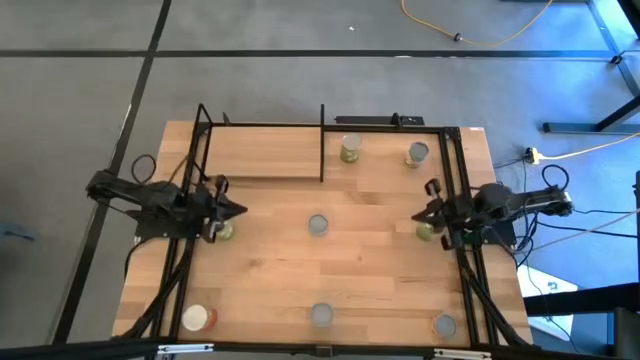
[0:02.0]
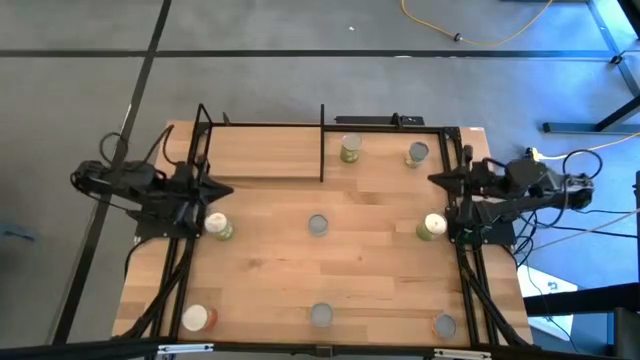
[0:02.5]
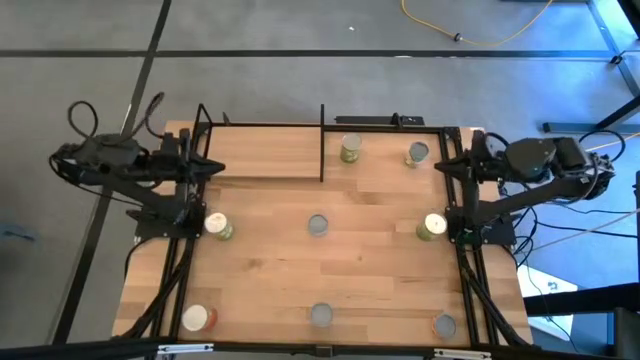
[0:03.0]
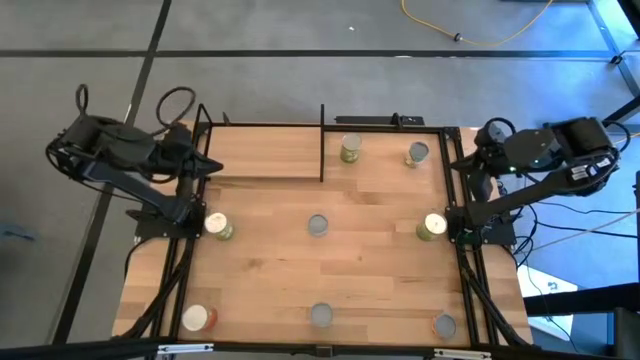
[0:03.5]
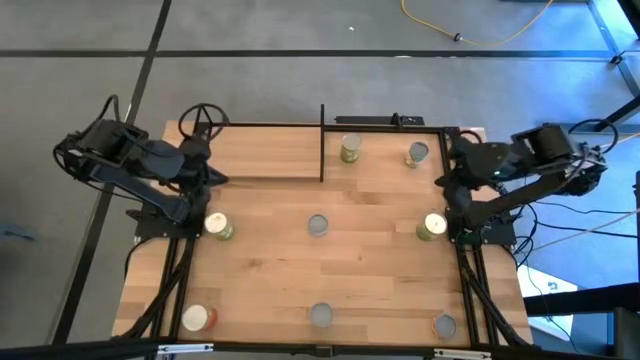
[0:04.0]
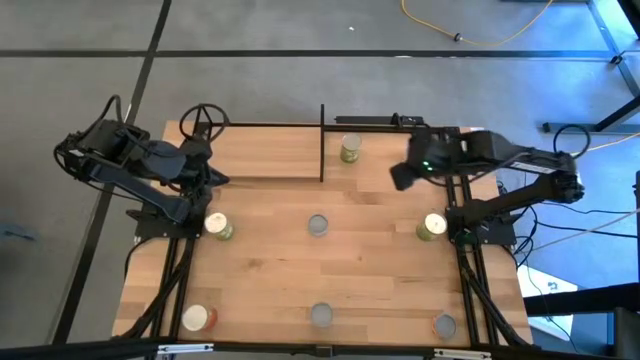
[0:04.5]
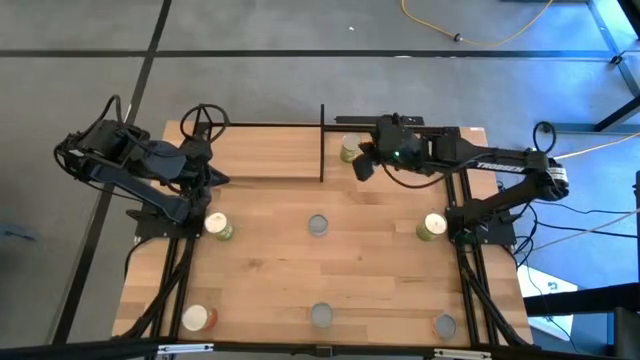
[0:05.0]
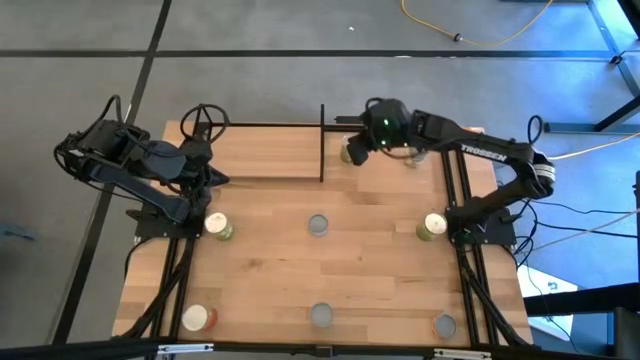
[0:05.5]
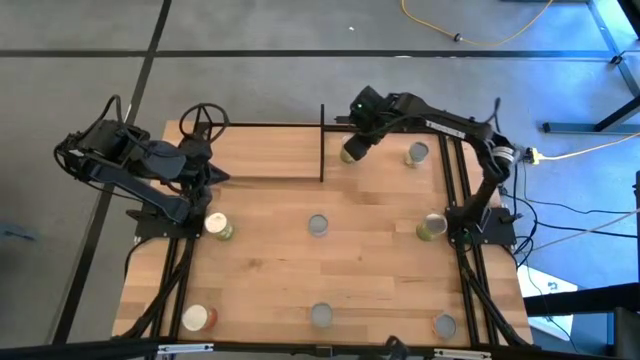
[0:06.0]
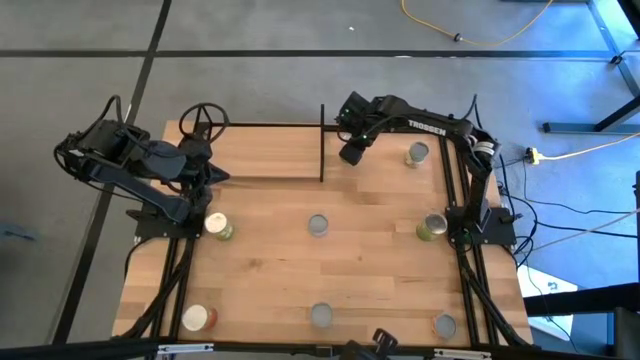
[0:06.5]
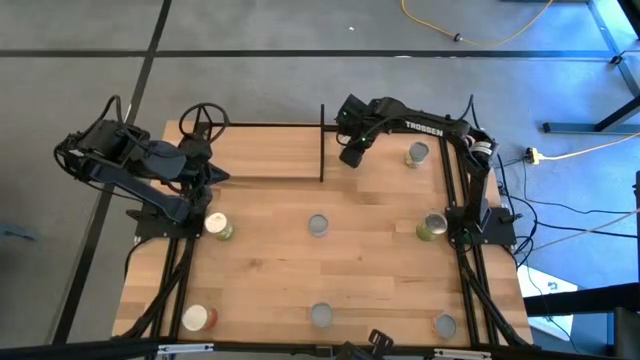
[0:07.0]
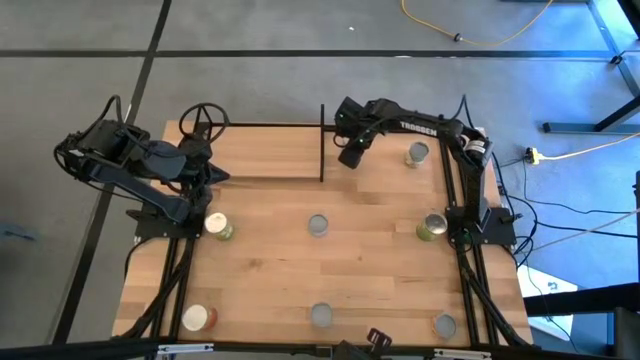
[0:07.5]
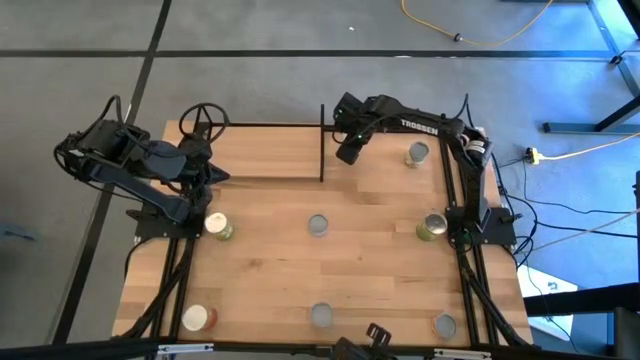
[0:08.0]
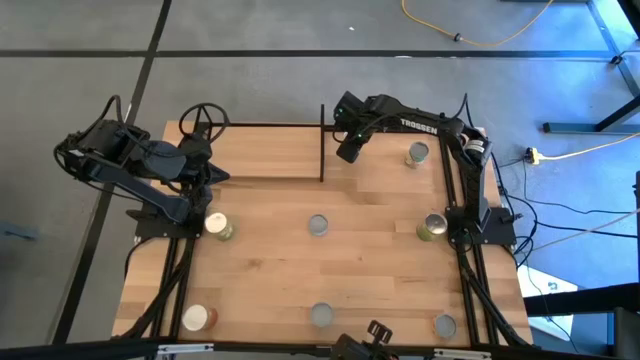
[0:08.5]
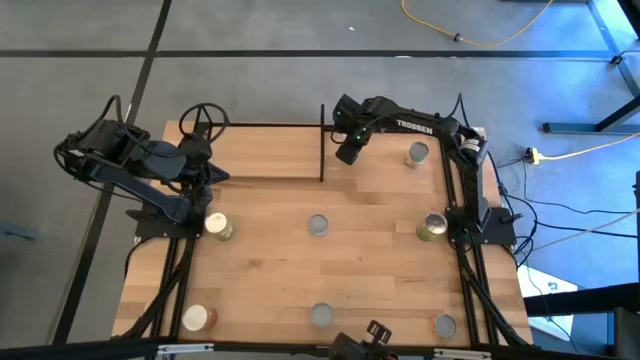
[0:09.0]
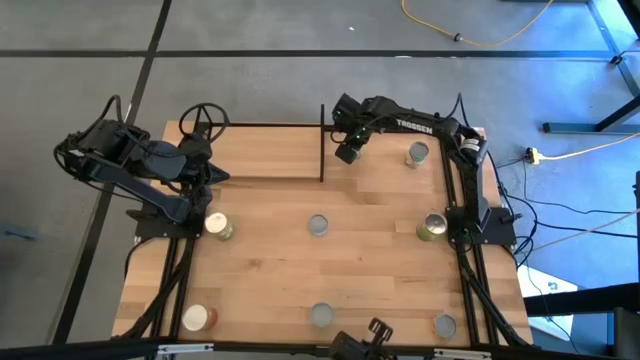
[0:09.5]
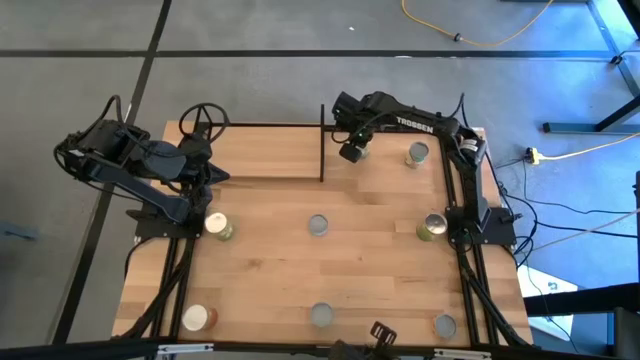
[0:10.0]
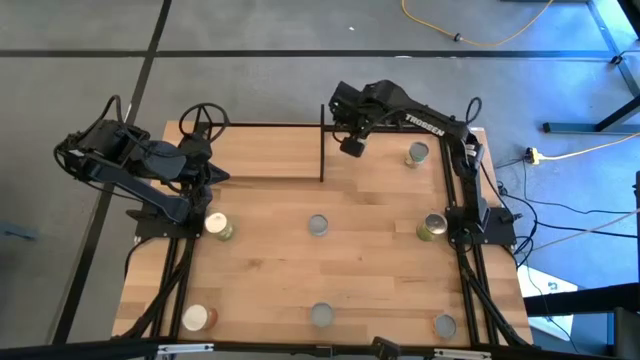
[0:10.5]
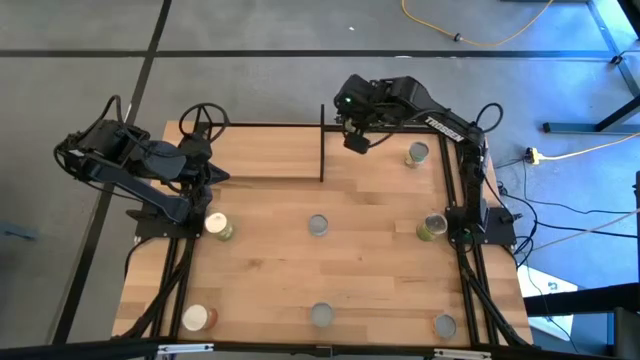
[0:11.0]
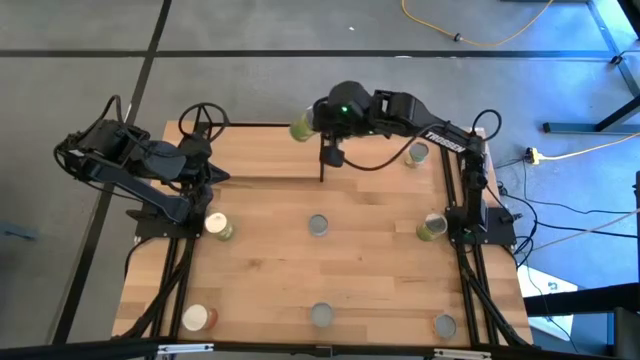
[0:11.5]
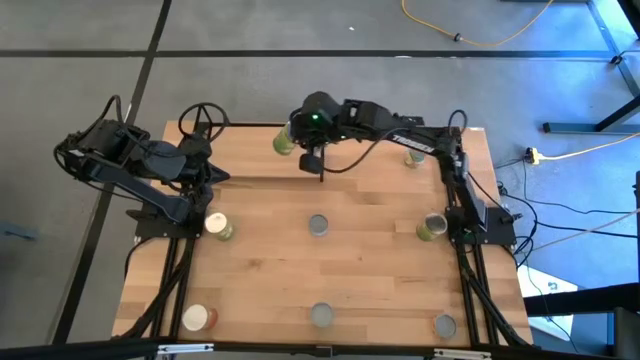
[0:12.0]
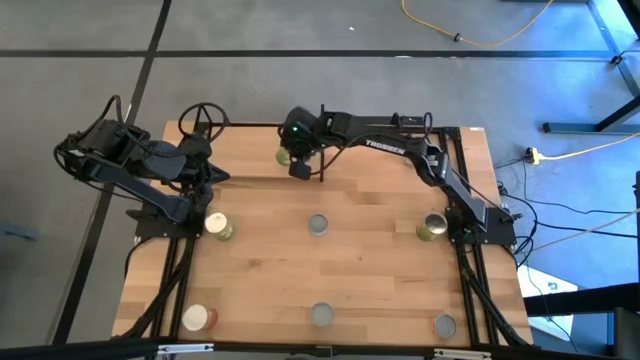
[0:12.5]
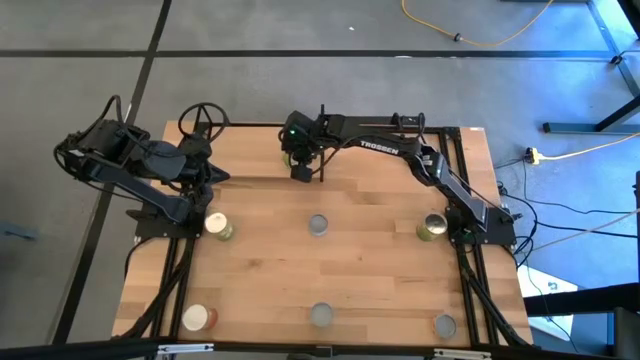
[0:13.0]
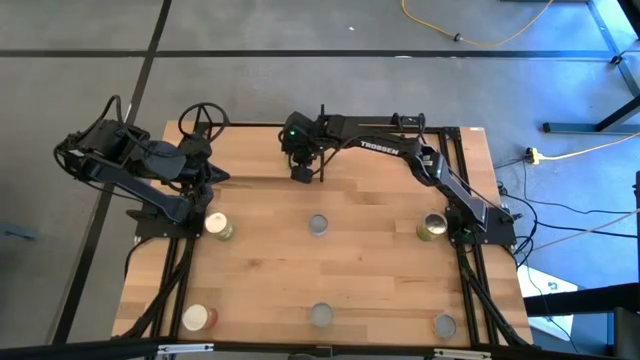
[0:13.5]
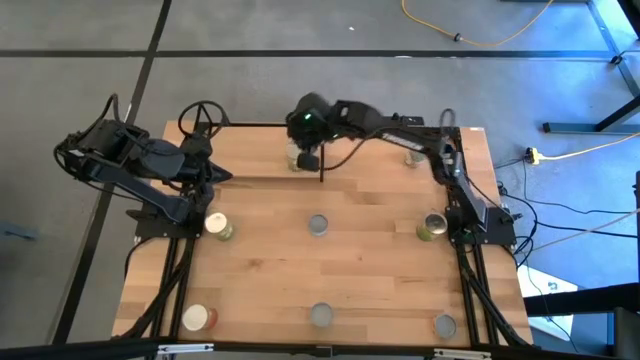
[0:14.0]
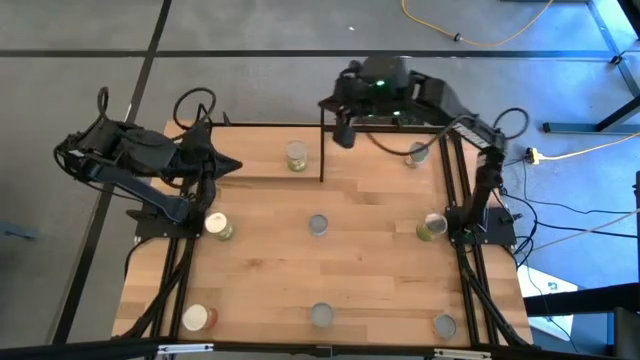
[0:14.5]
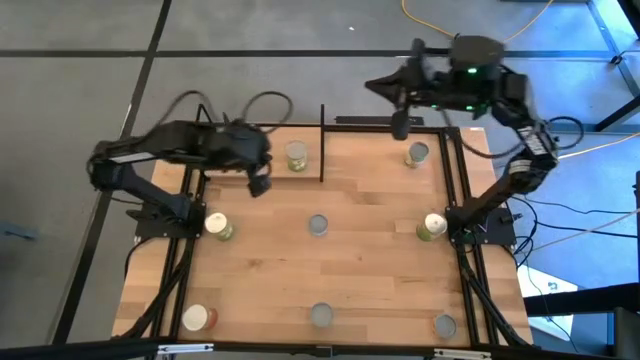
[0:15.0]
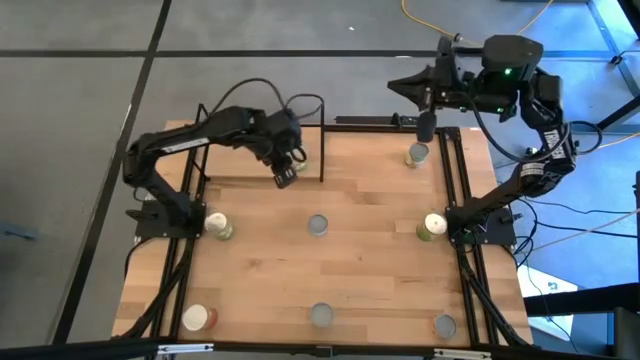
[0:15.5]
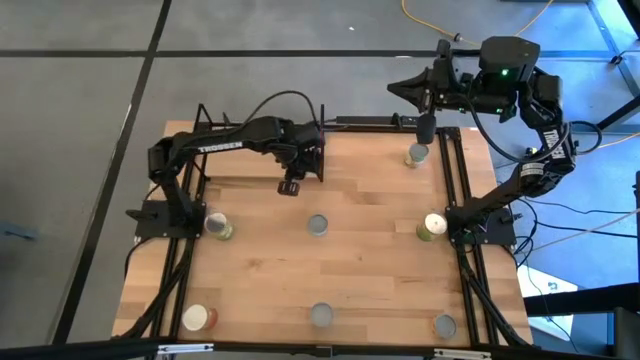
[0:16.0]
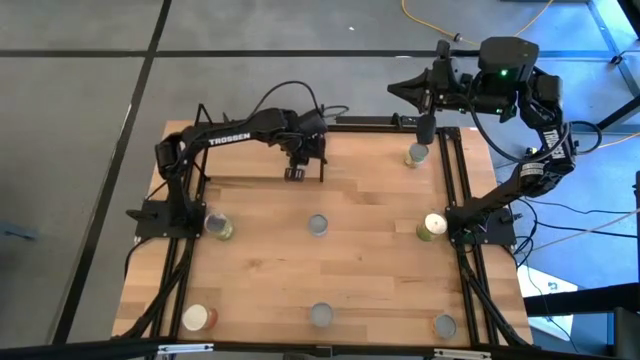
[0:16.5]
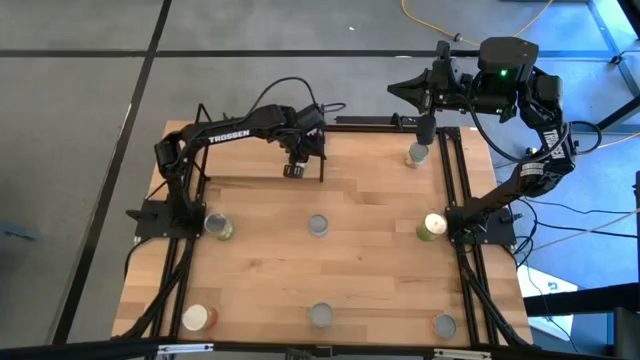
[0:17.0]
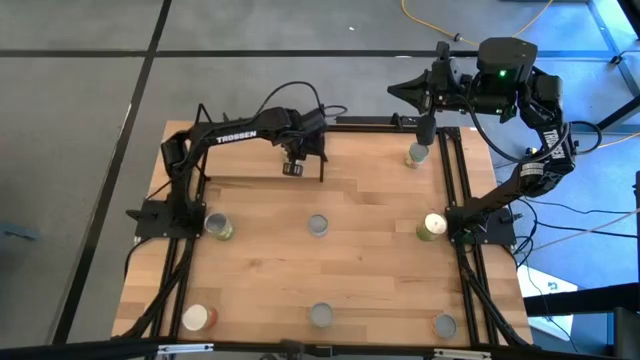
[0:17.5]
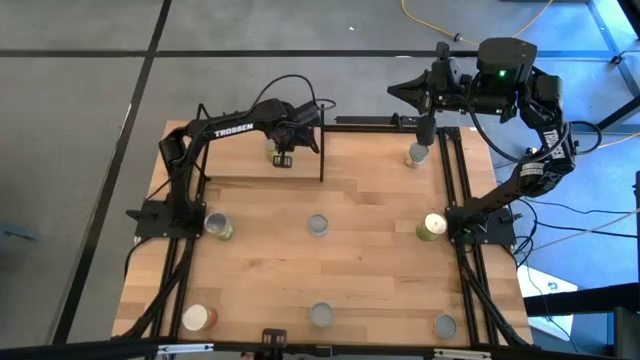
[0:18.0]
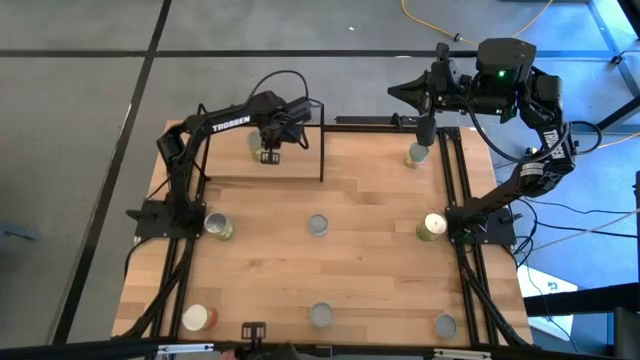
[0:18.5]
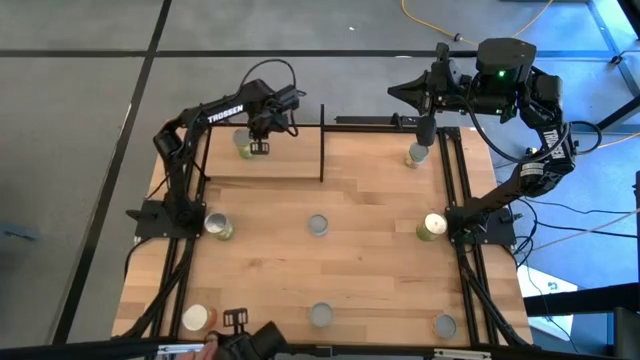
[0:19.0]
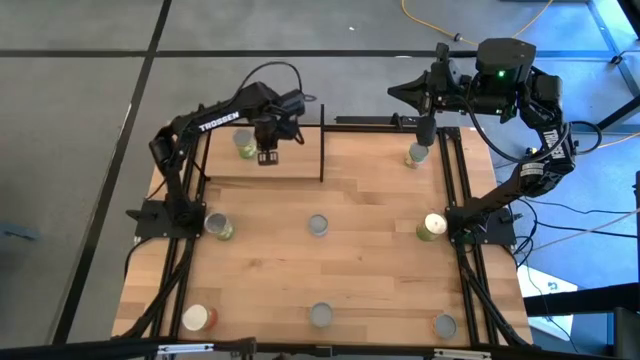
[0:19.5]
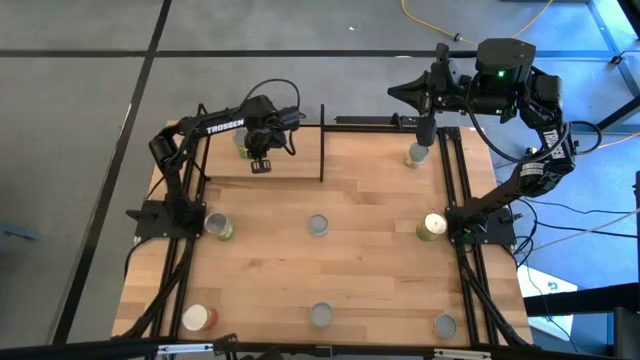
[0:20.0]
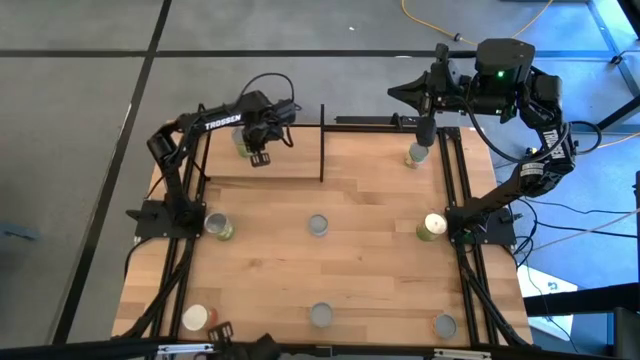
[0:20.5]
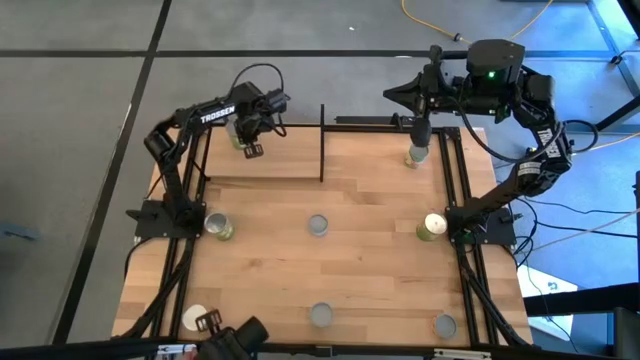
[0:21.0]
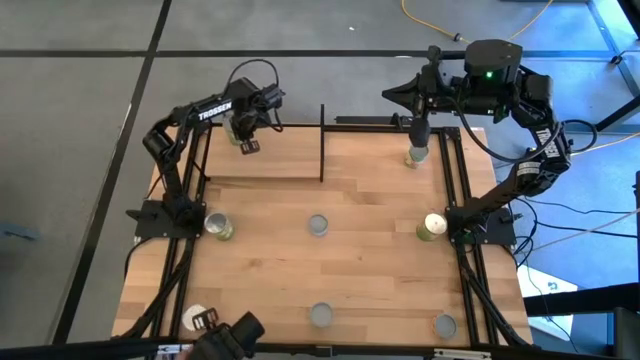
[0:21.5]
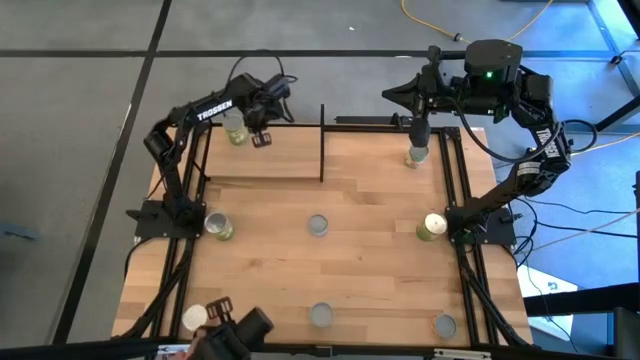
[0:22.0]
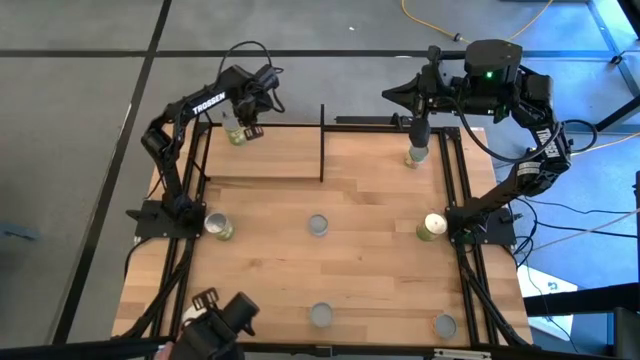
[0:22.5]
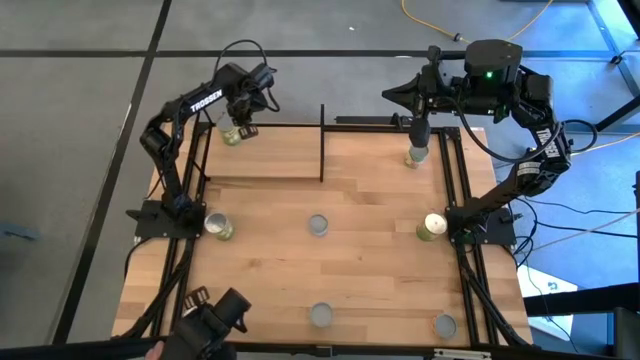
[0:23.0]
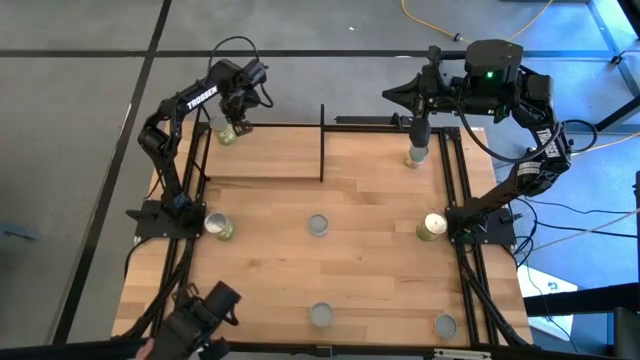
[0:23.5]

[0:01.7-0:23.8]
Task: Pick and place cans onto a shelf
Put the top canned pears on the shelf
